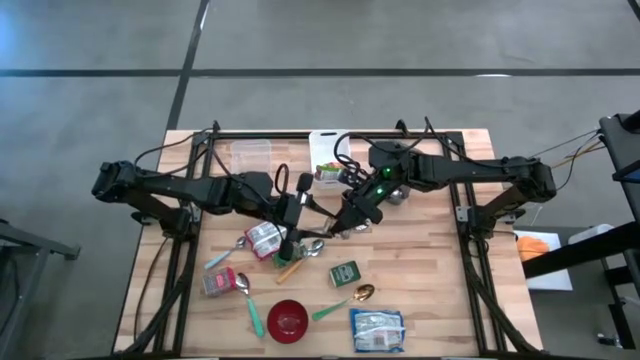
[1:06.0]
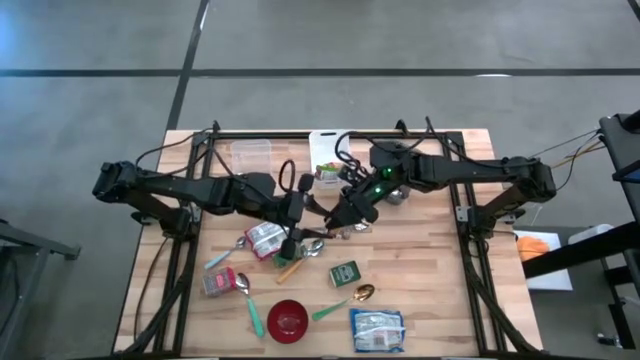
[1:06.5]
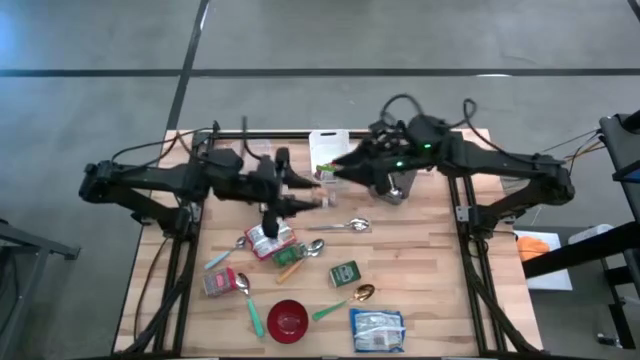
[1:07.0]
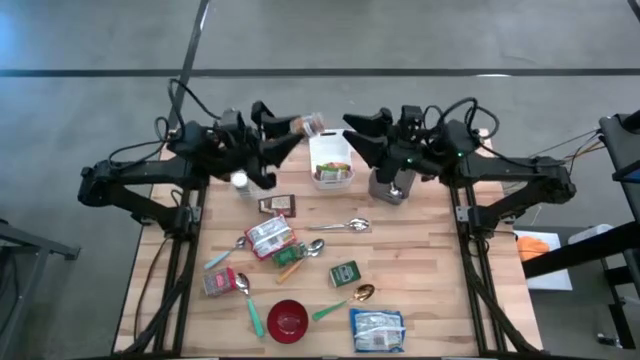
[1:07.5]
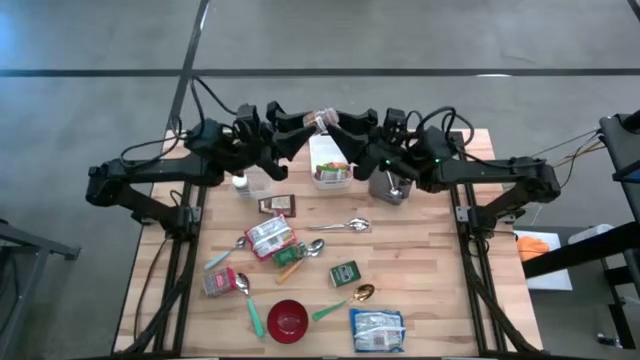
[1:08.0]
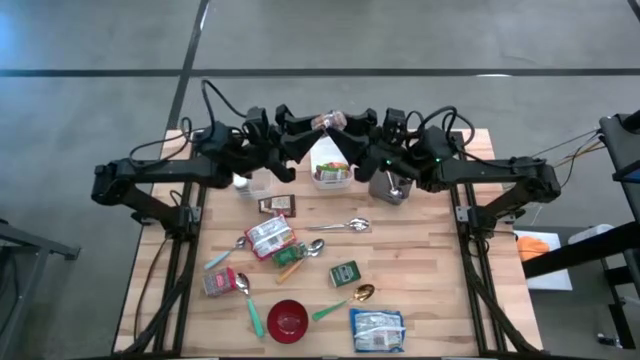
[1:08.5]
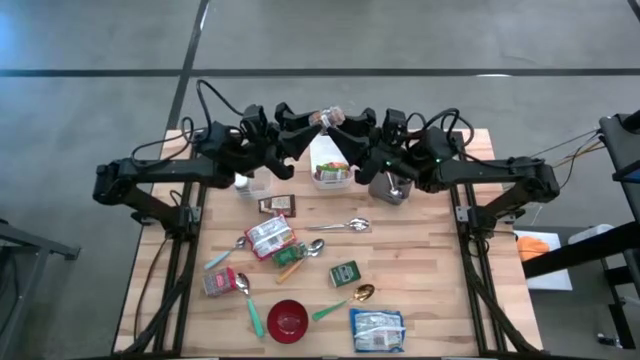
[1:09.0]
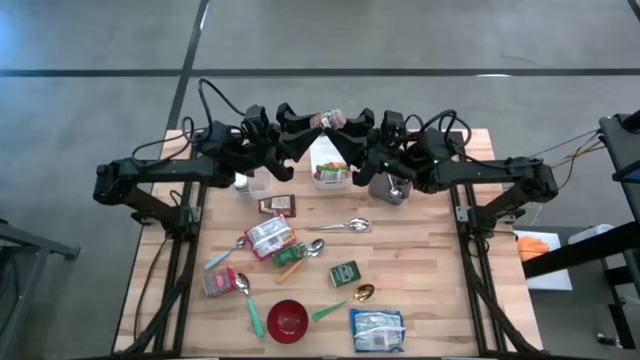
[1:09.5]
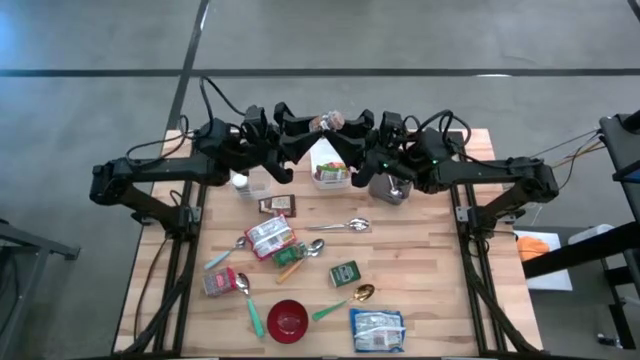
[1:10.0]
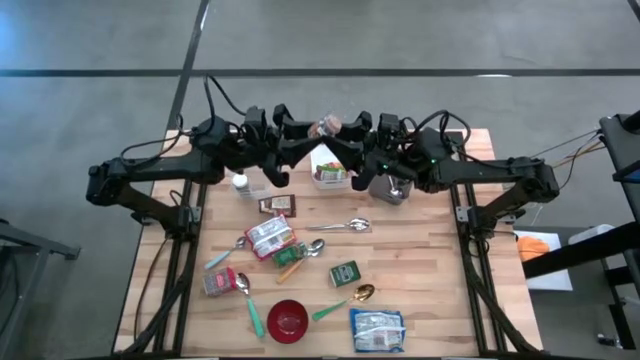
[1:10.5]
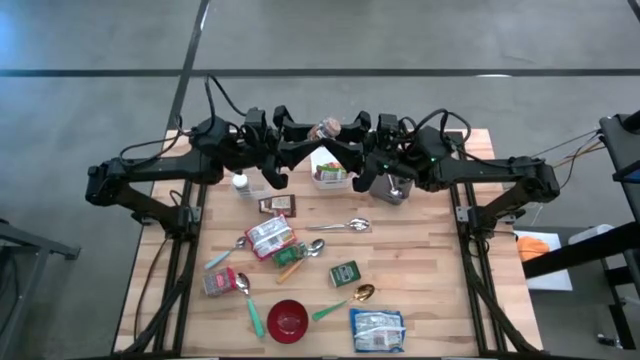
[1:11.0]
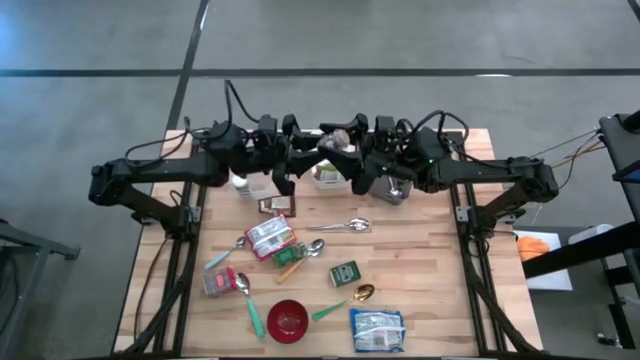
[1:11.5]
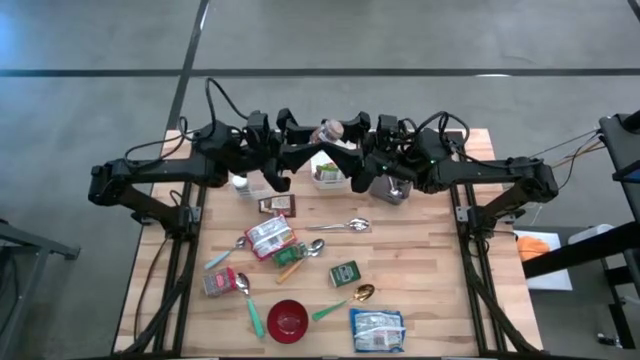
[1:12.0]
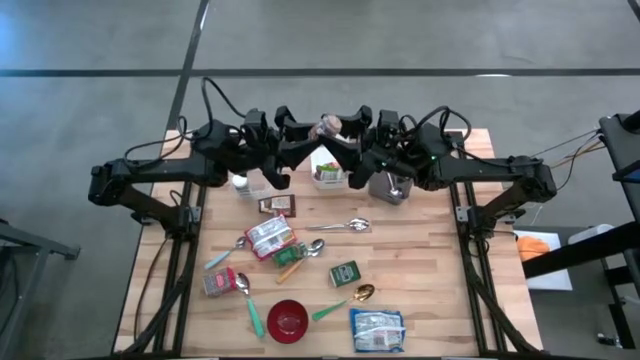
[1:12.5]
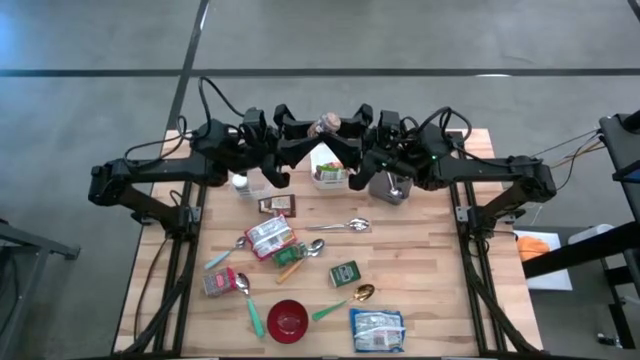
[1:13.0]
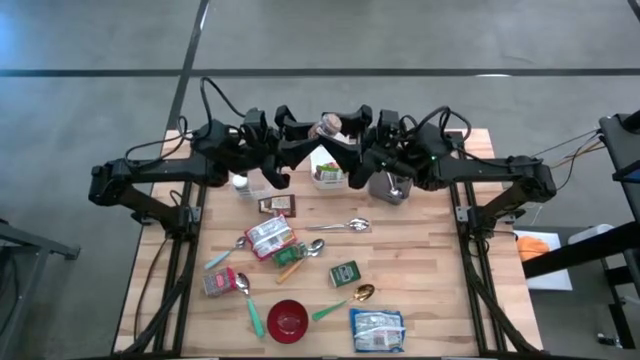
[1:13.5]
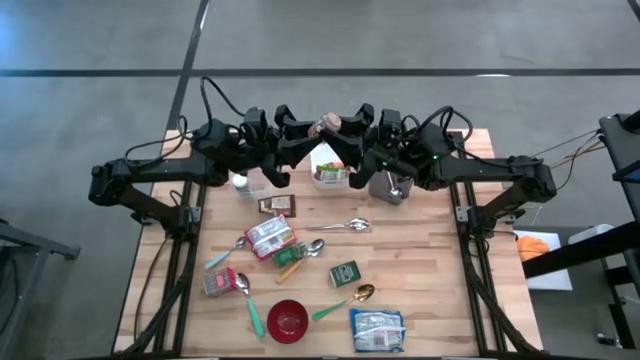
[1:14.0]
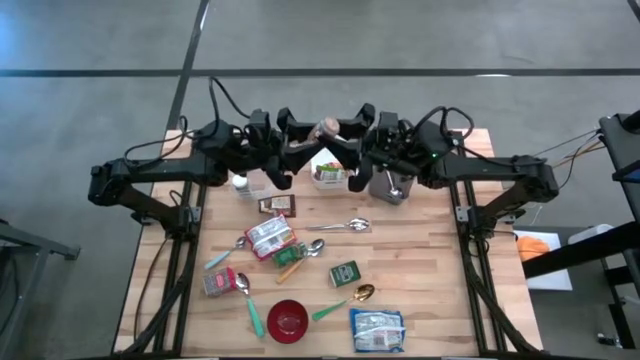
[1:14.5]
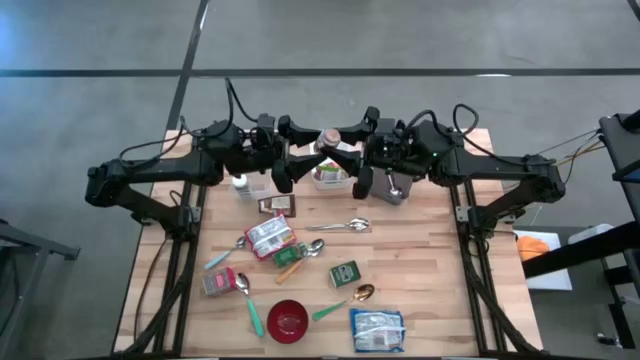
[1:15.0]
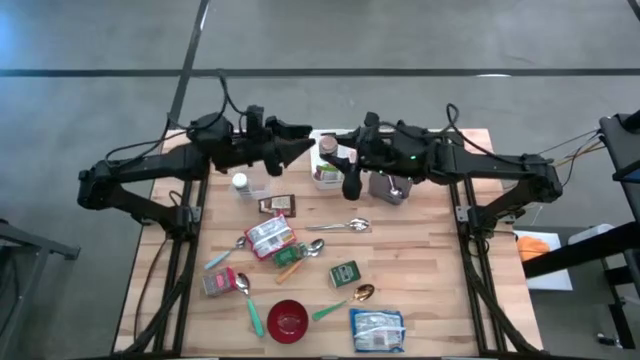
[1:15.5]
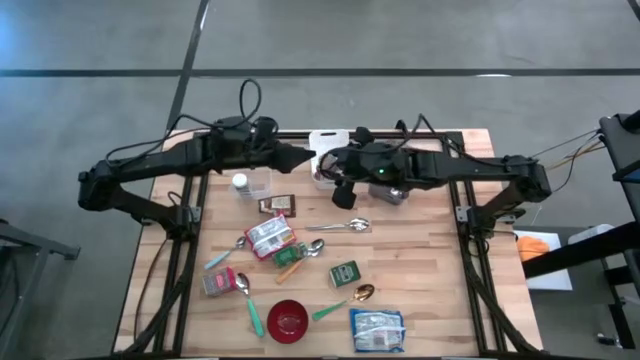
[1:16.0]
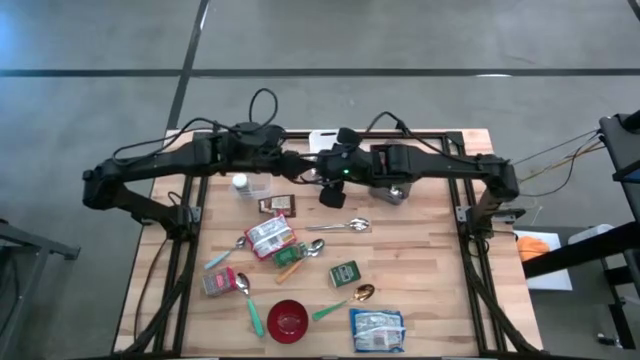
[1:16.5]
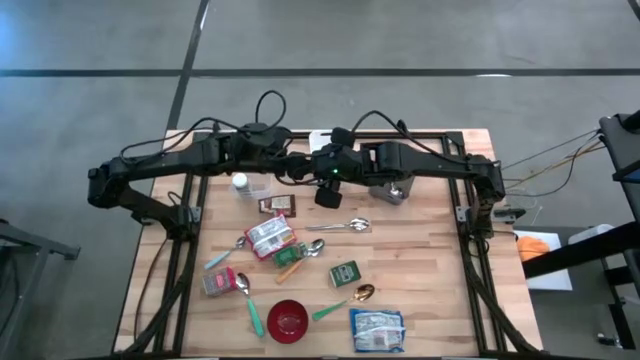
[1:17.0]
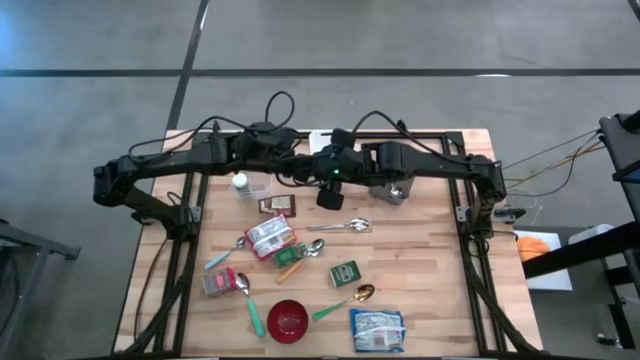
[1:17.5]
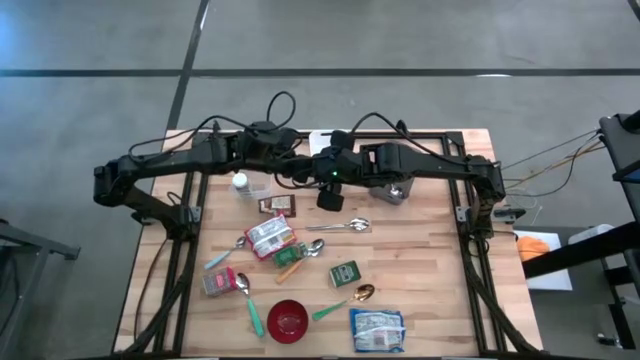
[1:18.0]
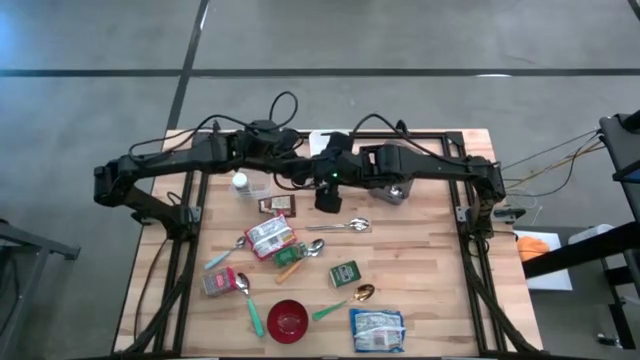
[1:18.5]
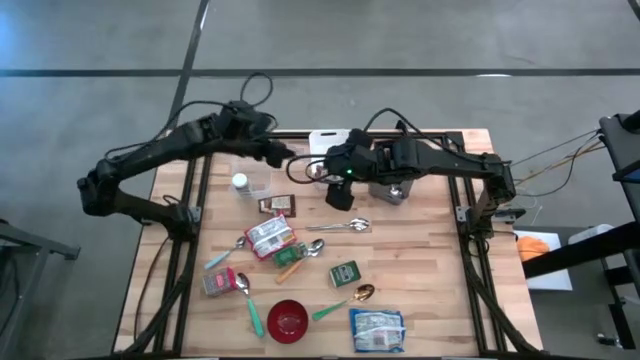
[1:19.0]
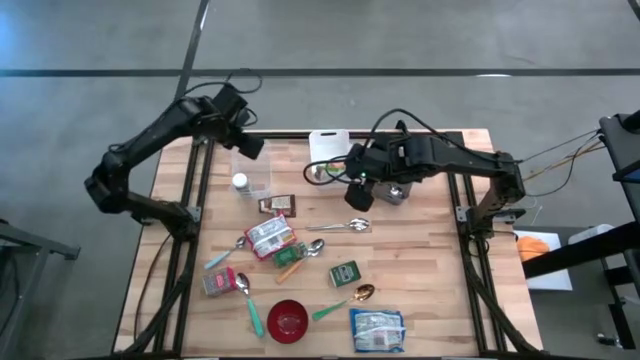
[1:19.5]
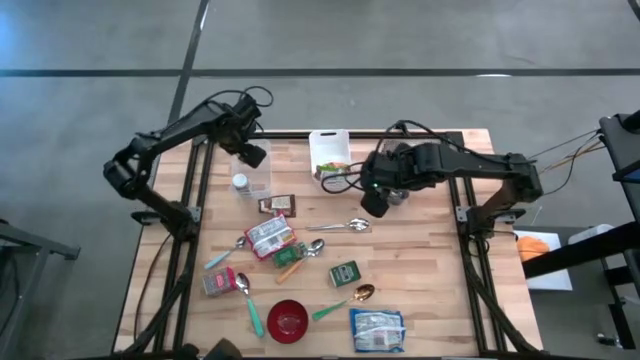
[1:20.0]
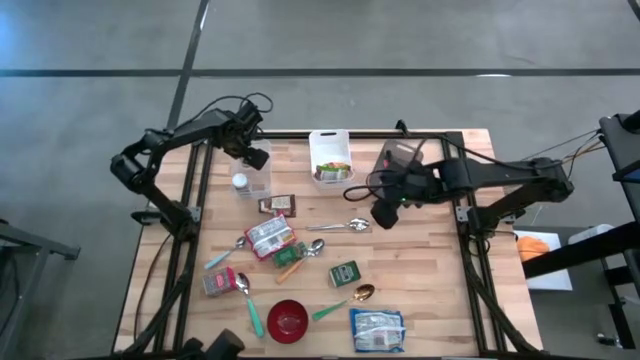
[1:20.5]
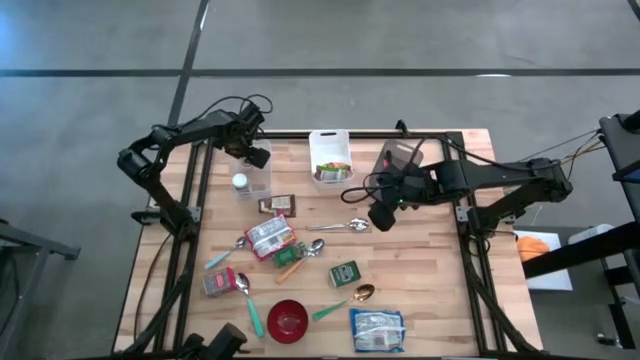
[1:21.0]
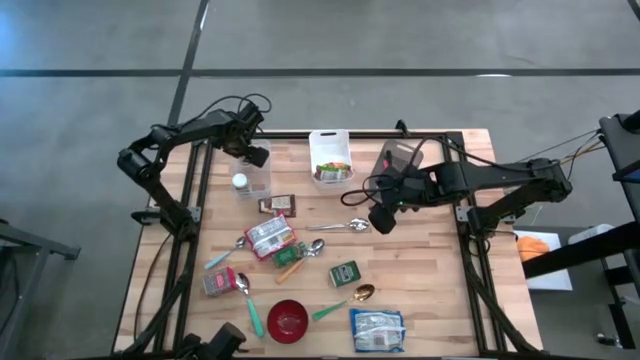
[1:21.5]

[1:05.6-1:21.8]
Put the brown seasoning bottle into the transparent bin

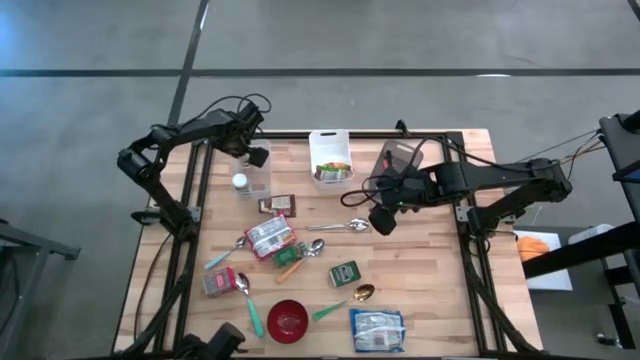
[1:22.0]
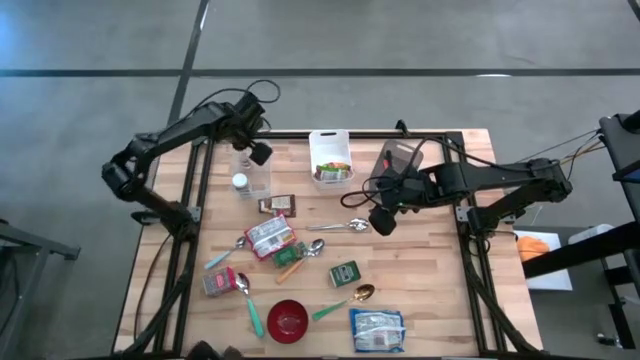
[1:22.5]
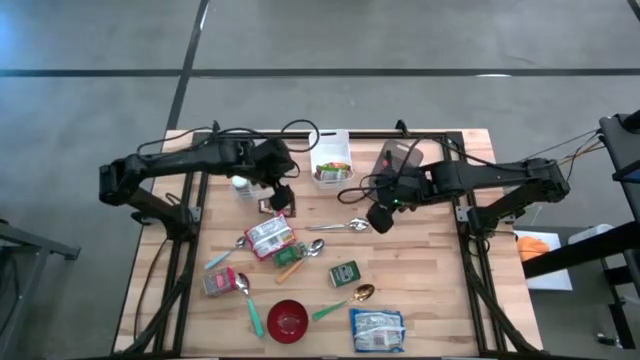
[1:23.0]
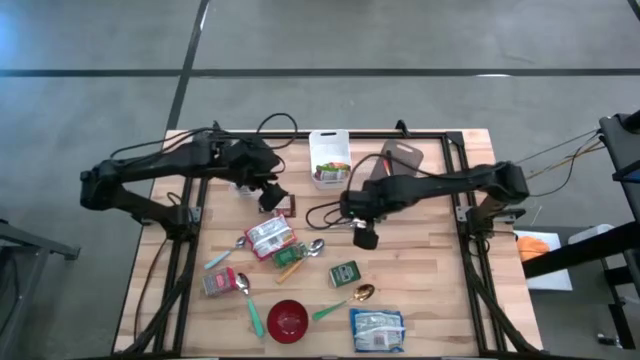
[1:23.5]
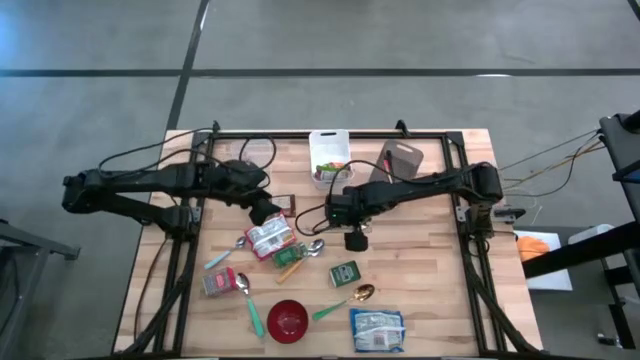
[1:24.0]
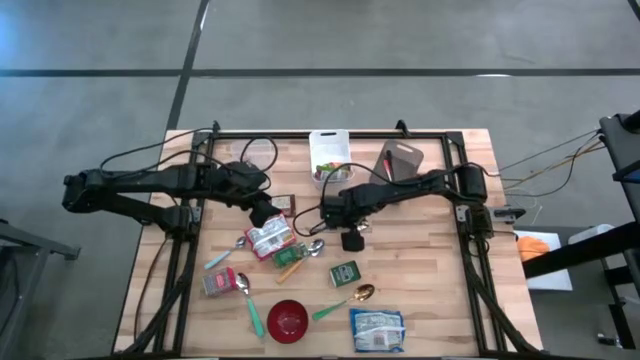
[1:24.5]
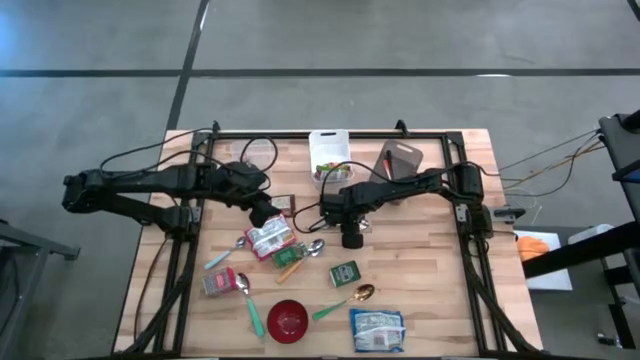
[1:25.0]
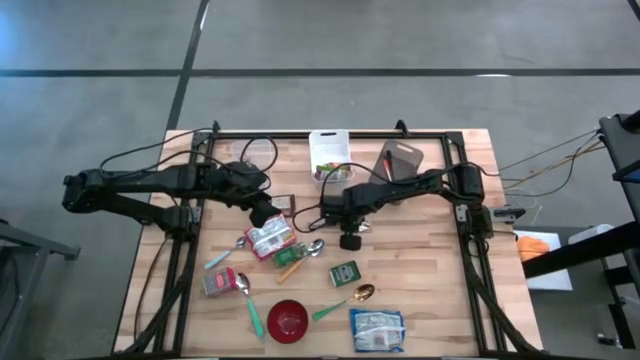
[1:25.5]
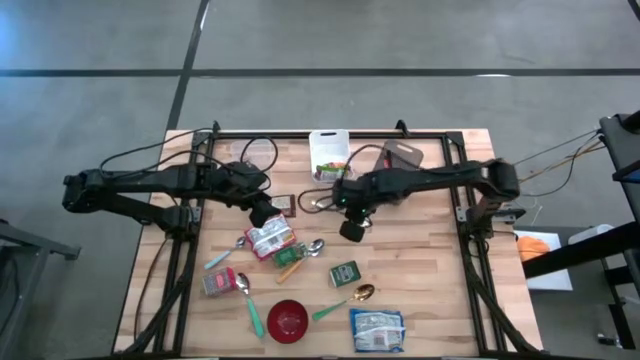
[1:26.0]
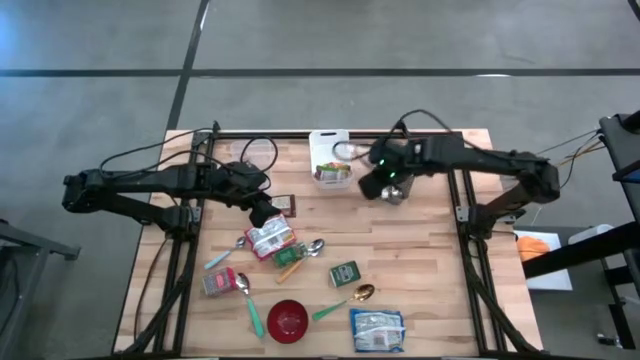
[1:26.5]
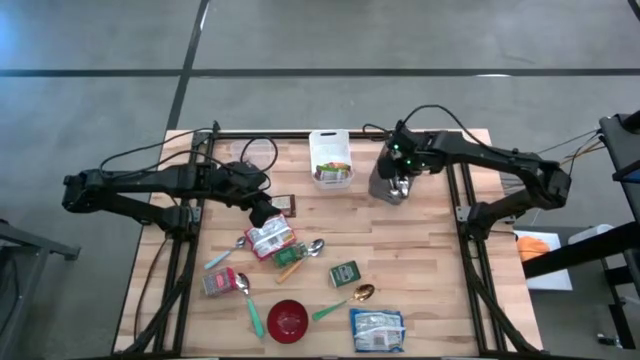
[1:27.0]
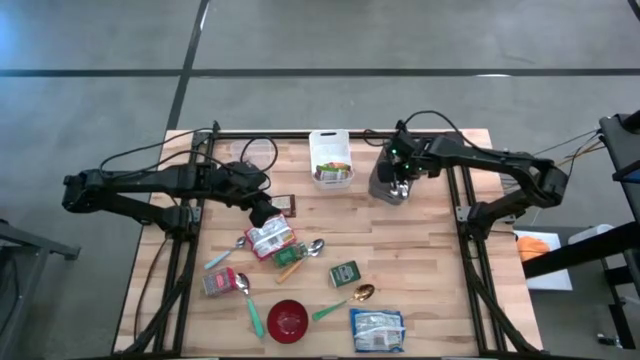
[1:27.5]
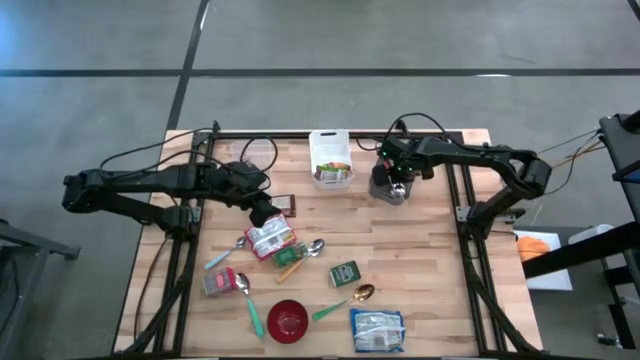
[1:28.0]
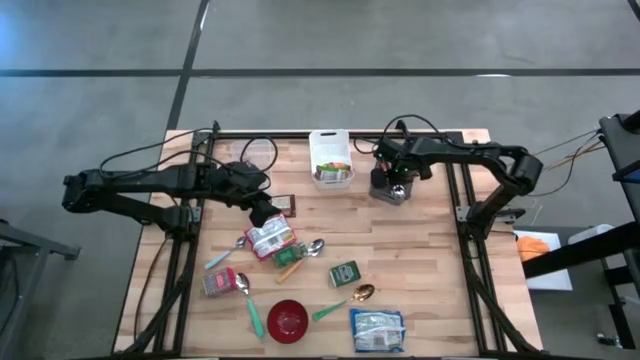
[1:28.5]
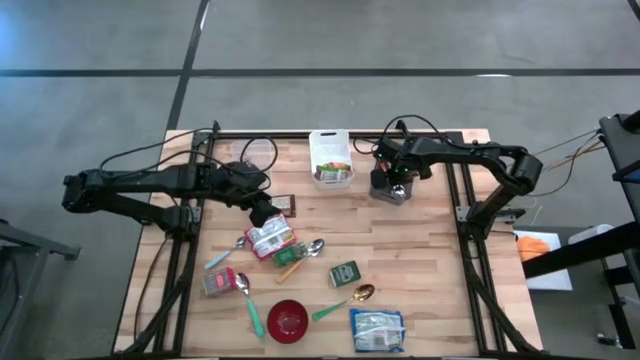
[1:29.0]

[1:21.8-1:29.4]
Put the silver spoon into the black bin
